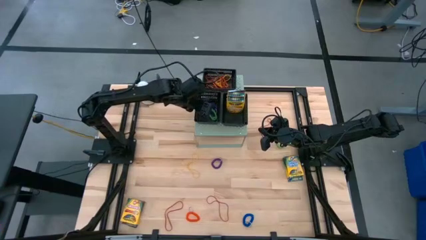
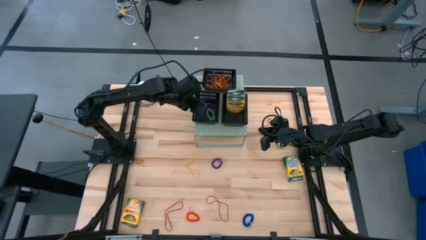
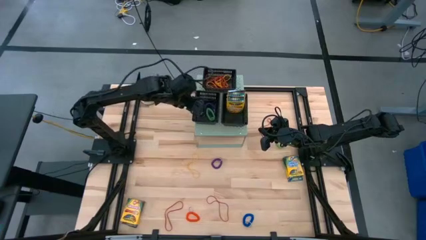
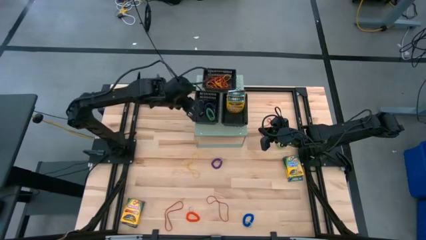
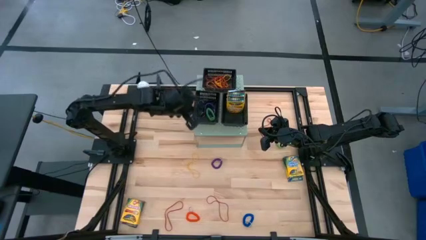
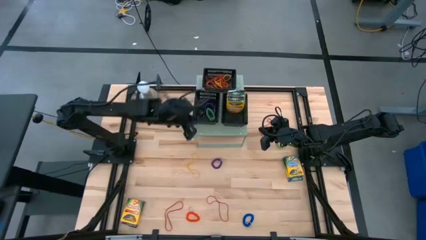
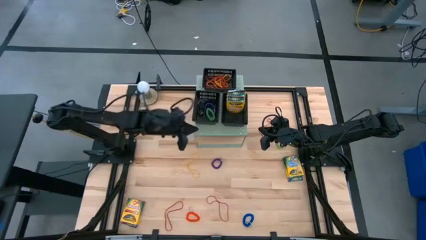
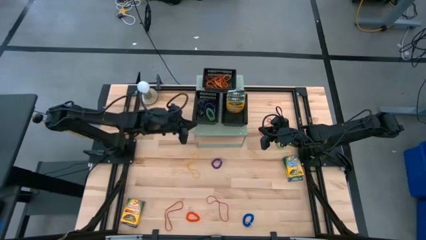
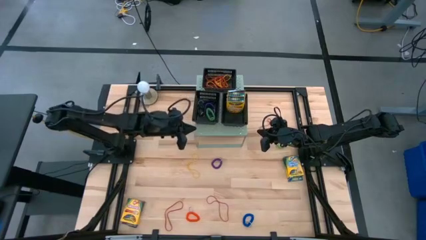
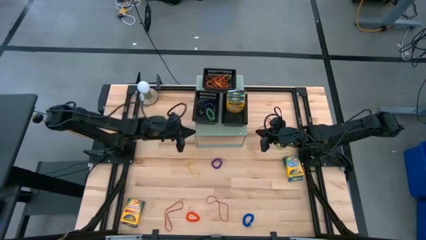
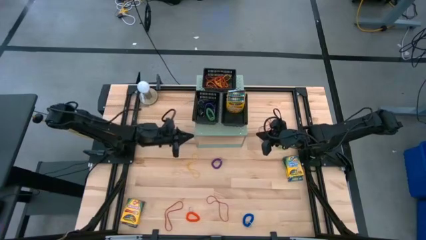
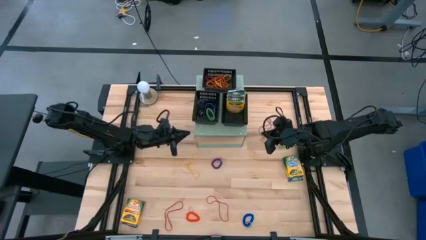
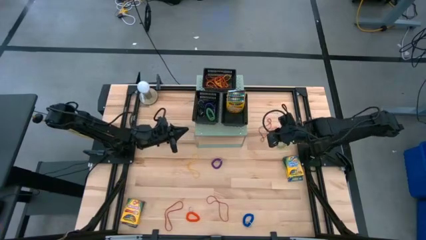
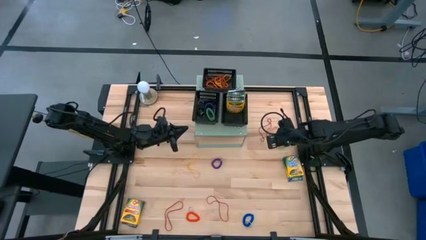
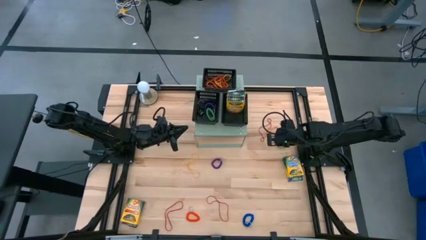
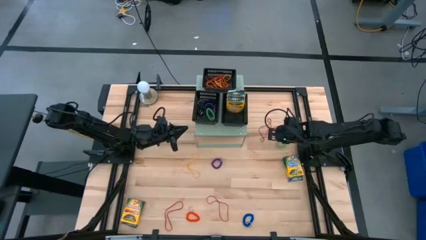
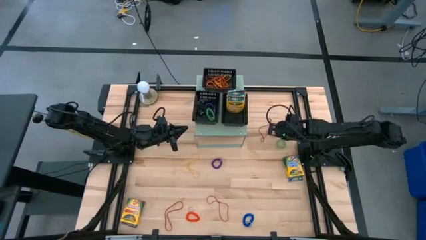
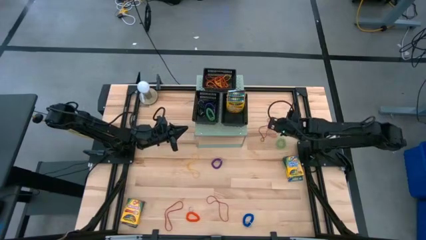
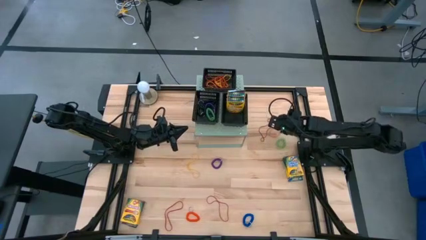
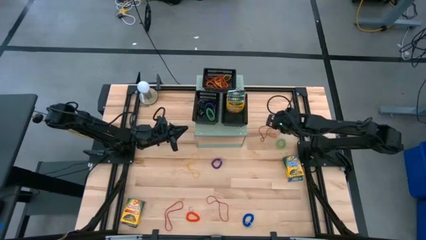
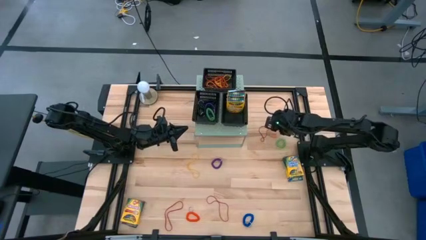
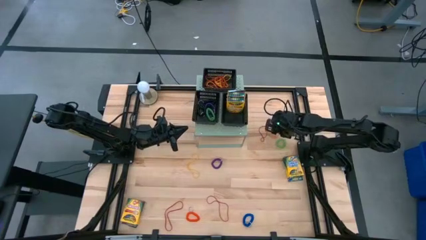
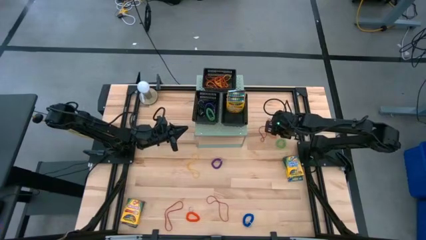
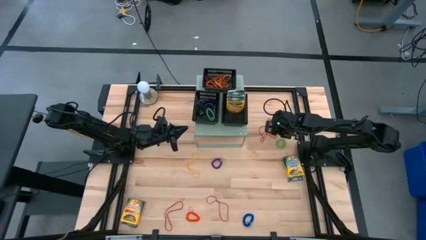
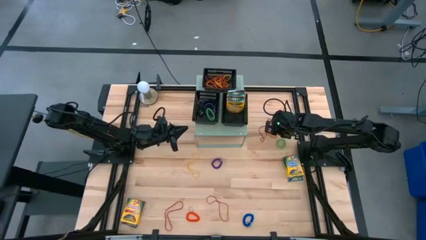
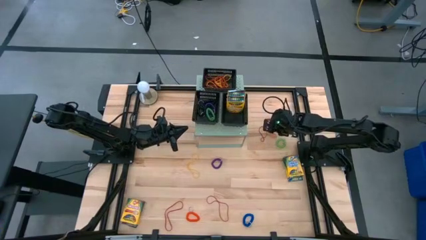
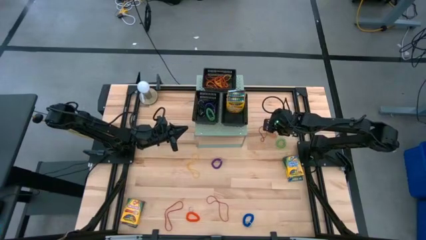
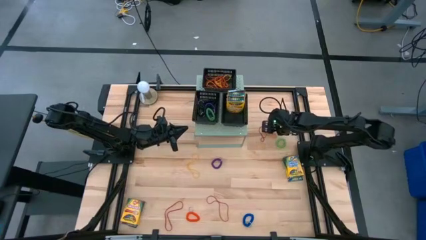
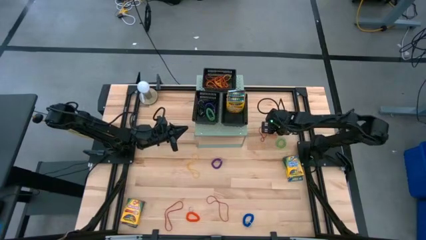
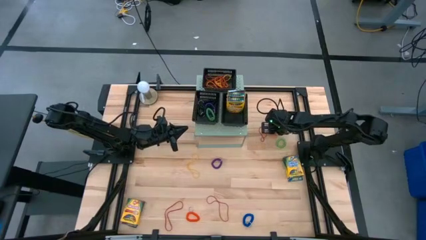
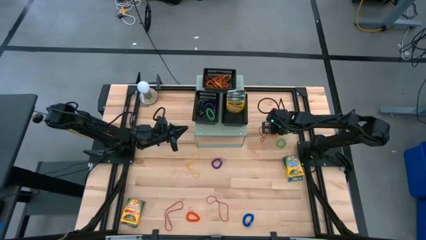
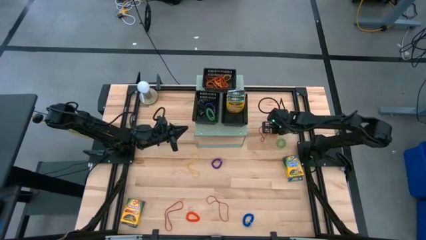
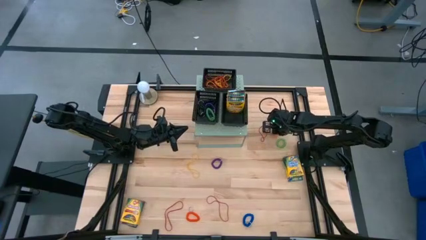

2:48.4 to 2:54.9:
Task: Pick & Place Office Desk Supplies
Put the orange rubber band into the top black bin

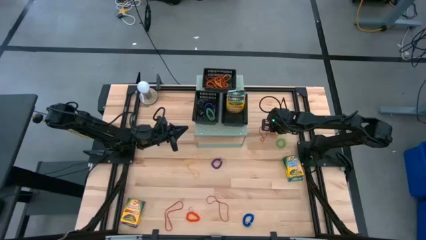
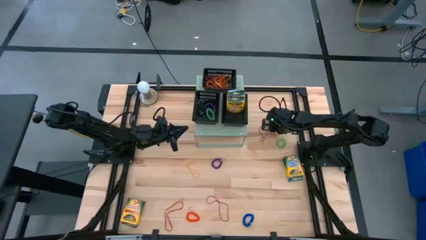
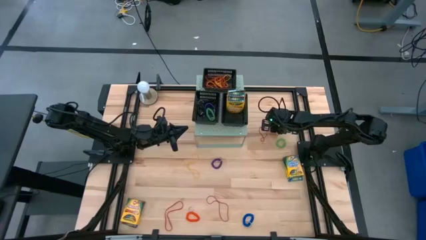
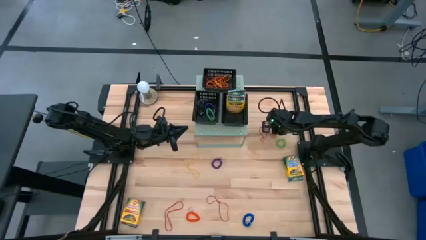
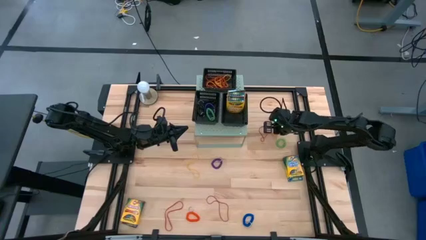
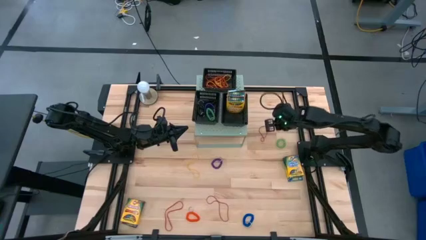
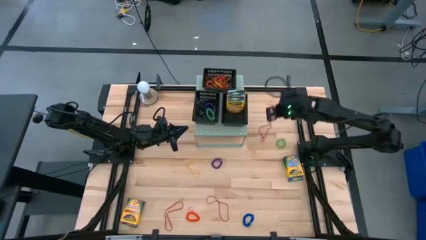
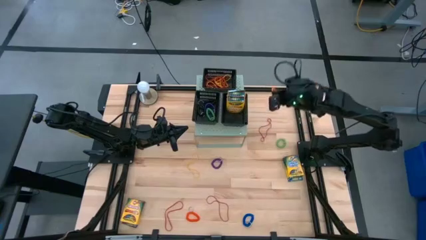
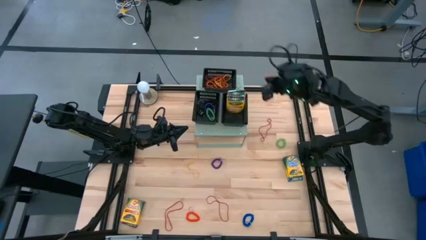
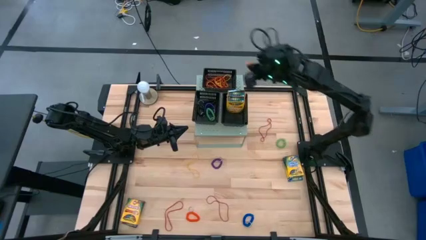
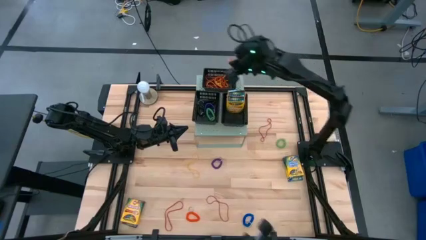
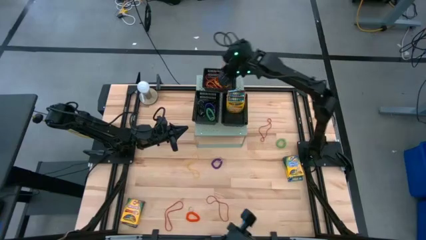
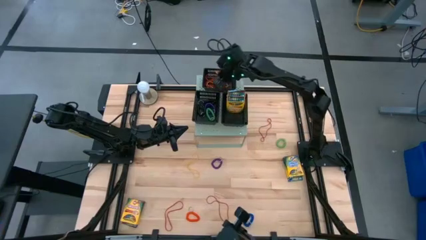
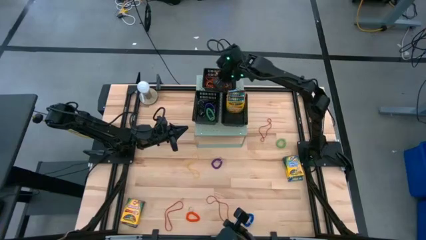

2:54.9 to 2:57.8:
Put the orange rubber band into the top black bin

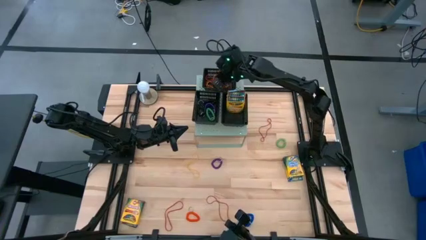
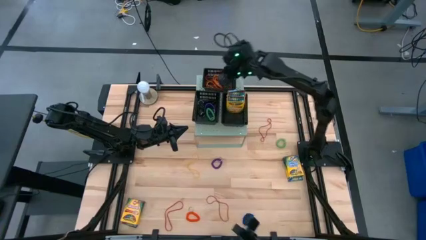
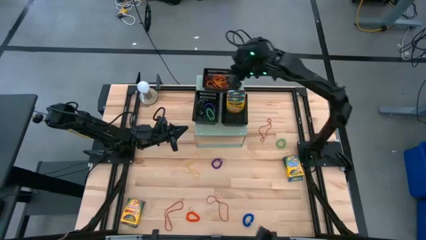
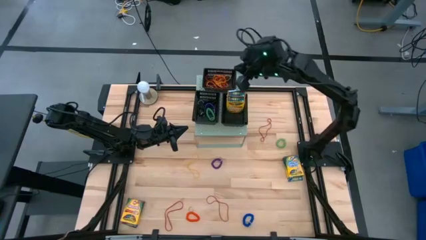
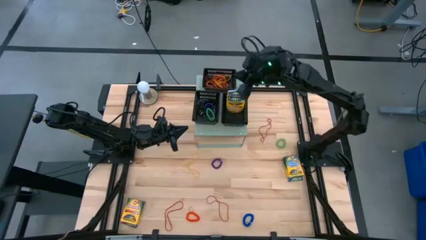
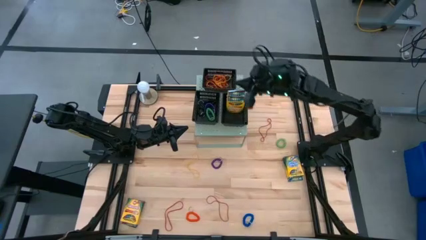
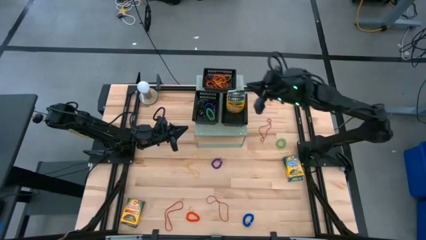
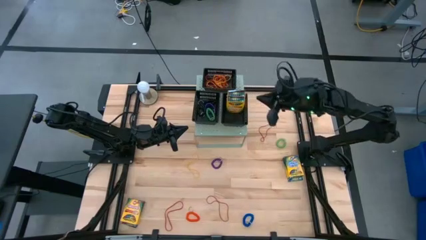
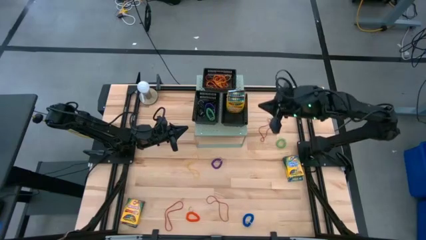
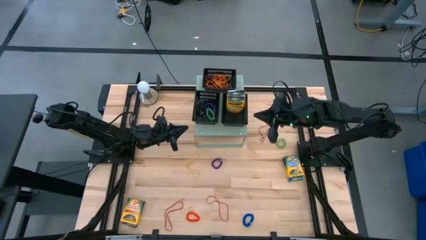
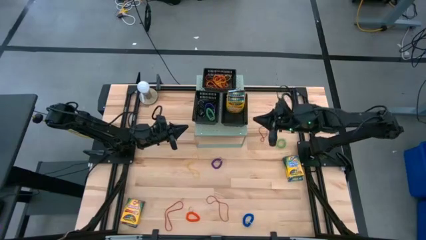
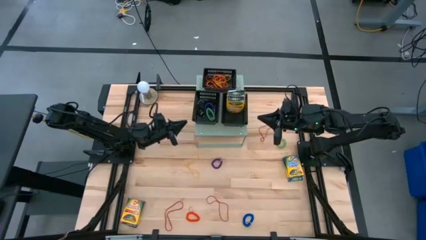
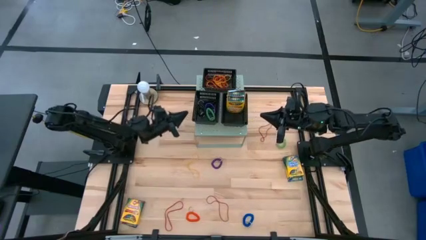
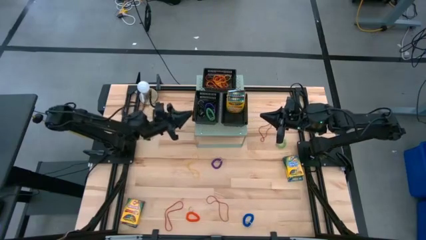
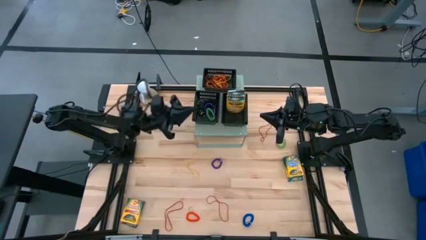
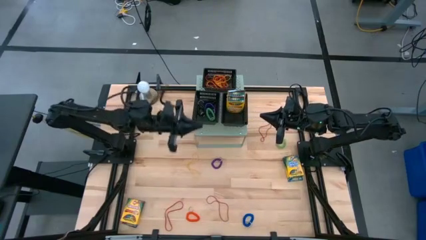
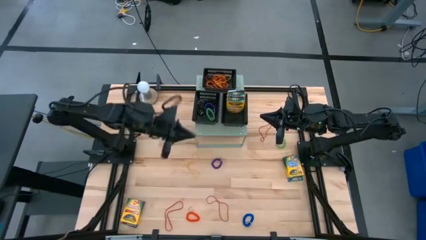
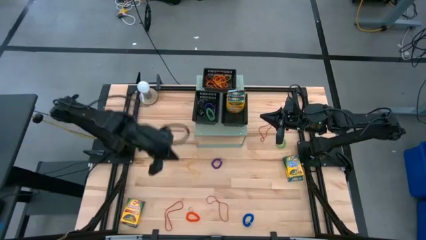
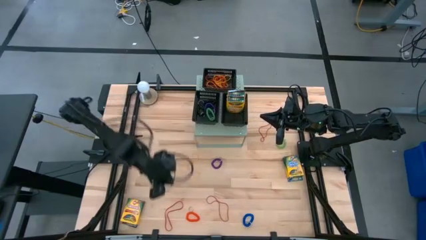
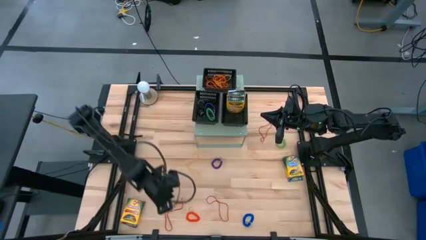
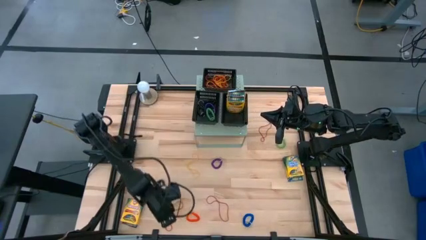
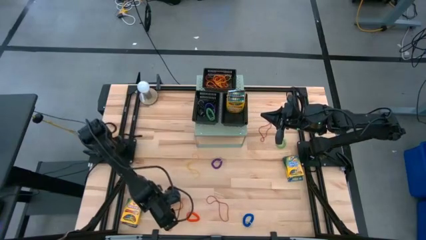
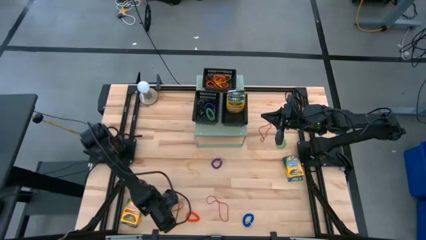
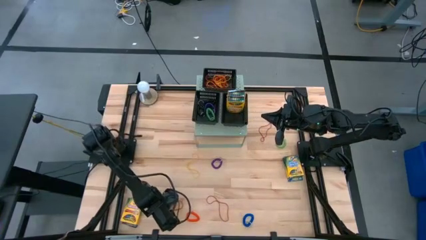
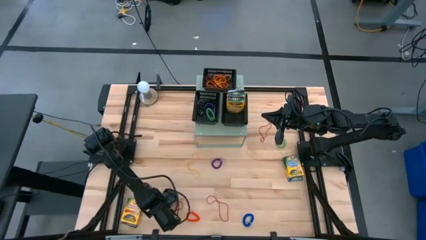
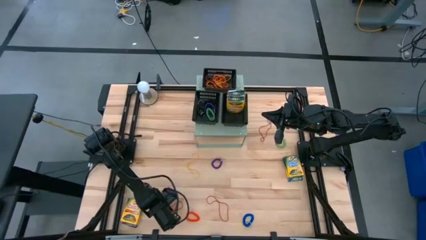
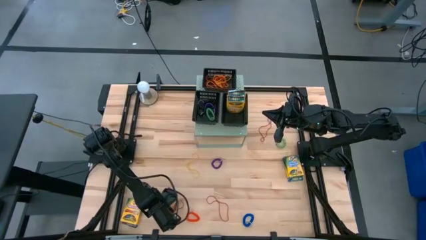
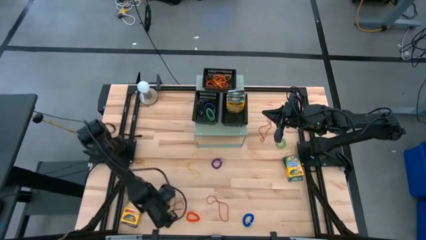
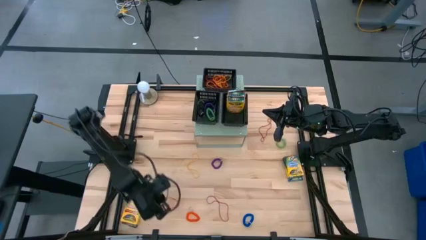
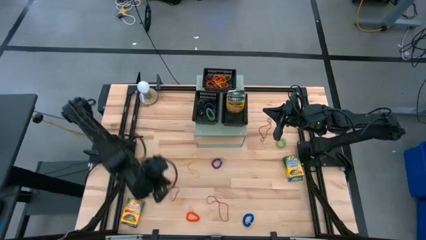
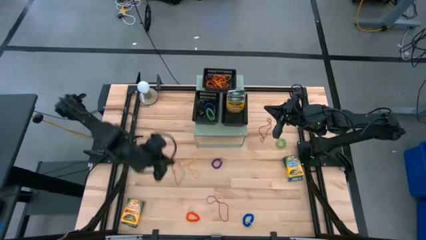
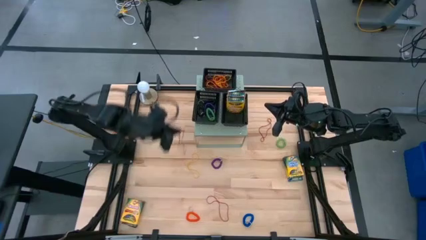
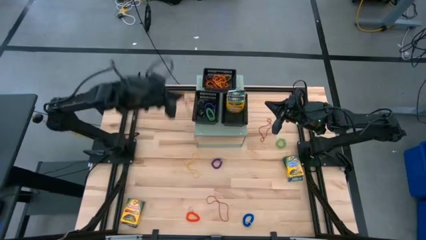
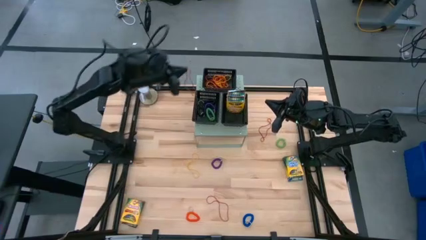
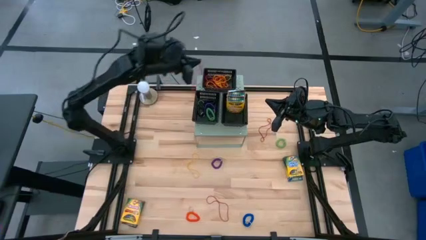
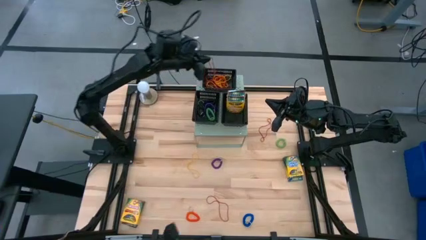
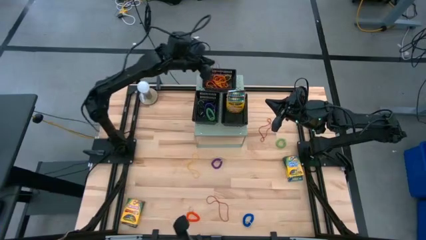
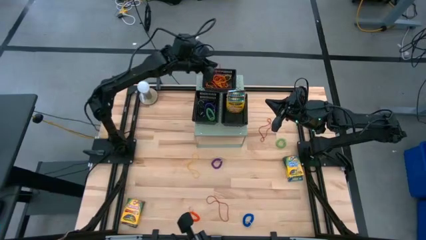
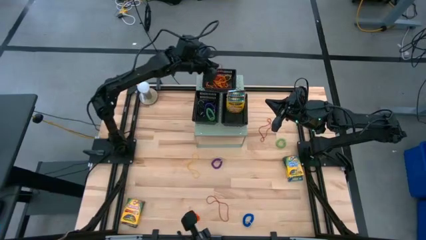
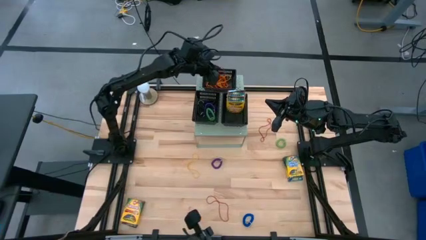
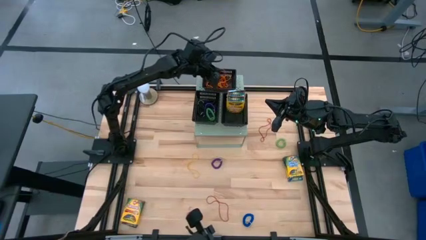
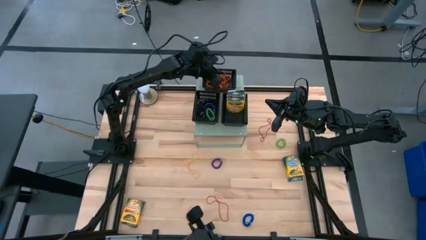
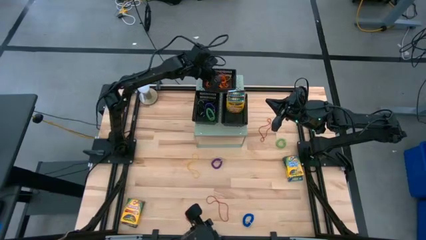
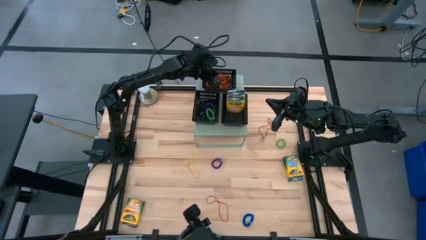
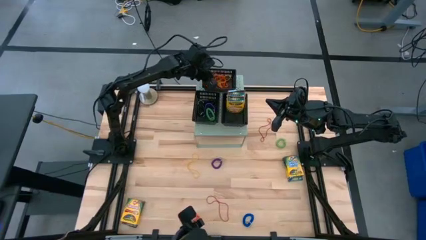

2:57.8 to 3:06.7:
Put the red rubber band into the top black bin
